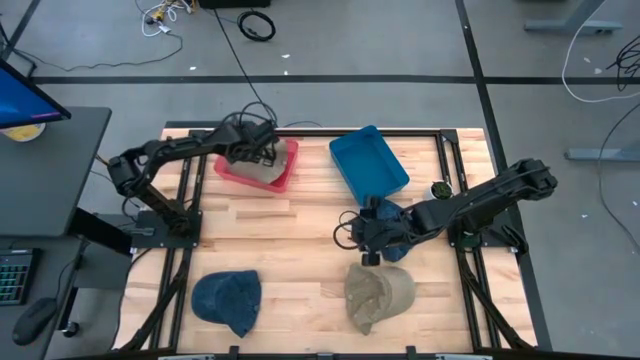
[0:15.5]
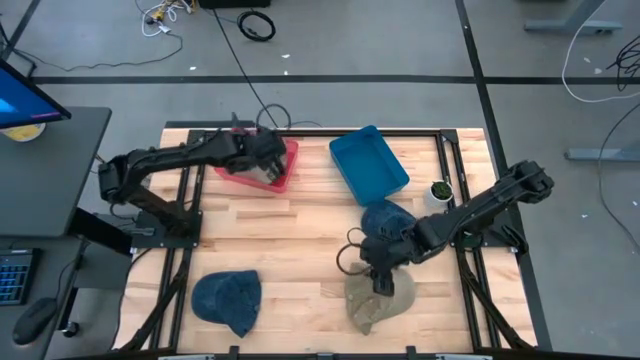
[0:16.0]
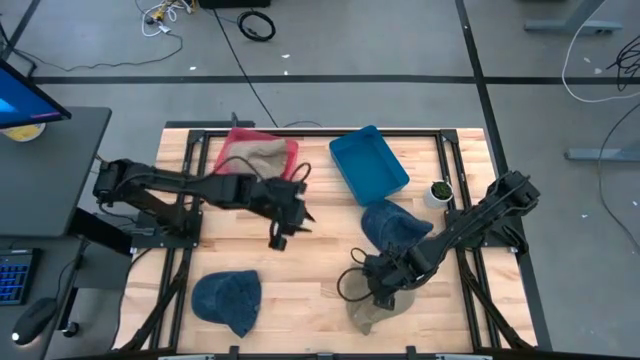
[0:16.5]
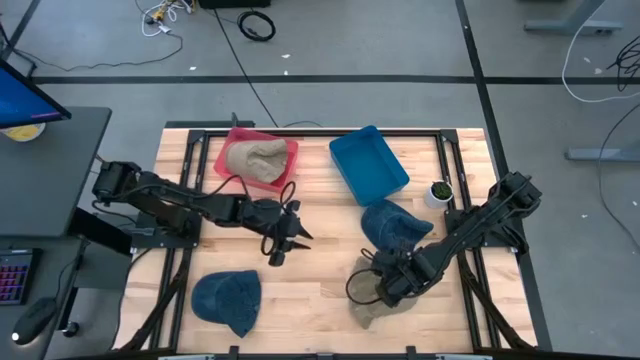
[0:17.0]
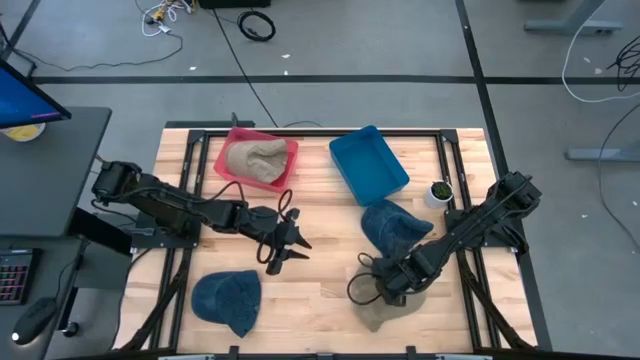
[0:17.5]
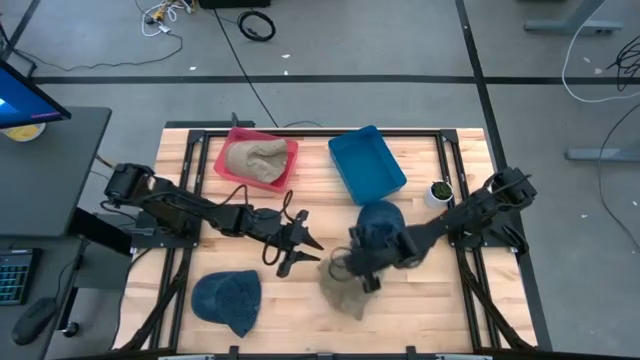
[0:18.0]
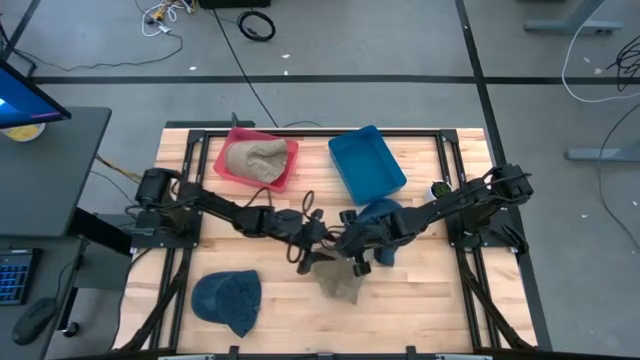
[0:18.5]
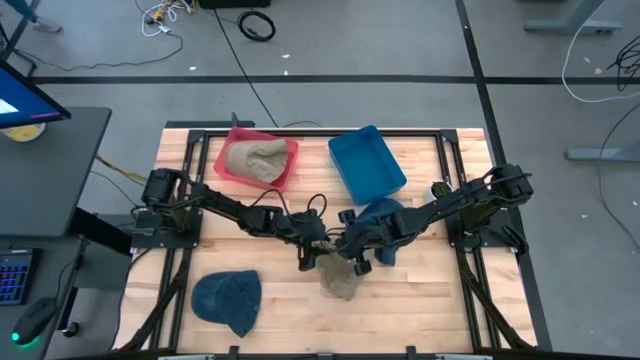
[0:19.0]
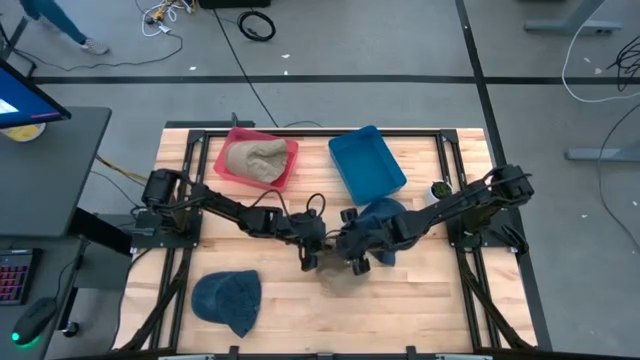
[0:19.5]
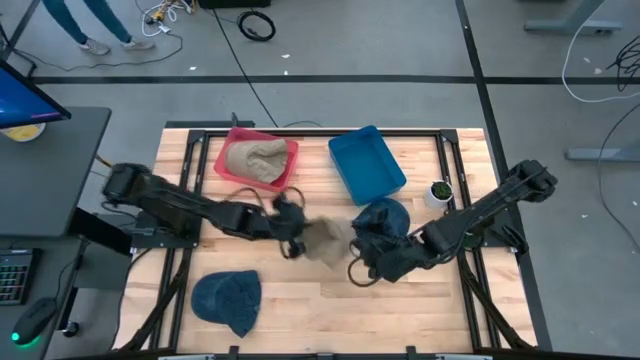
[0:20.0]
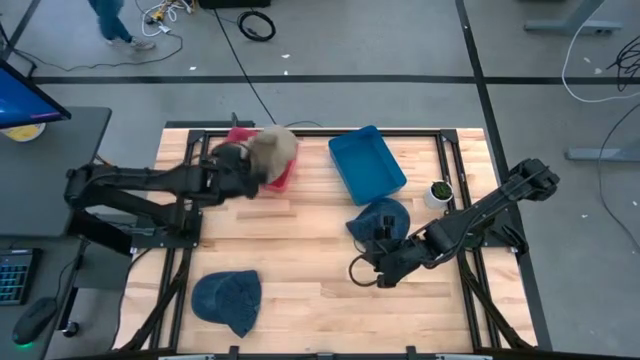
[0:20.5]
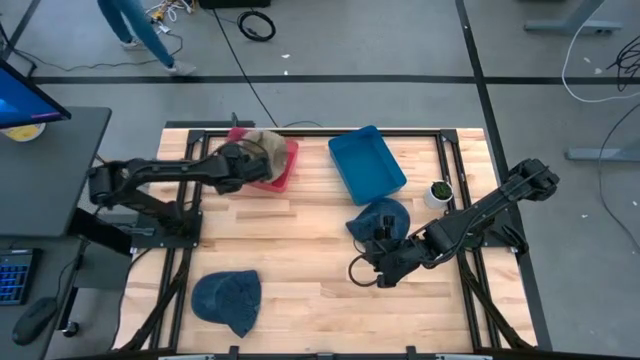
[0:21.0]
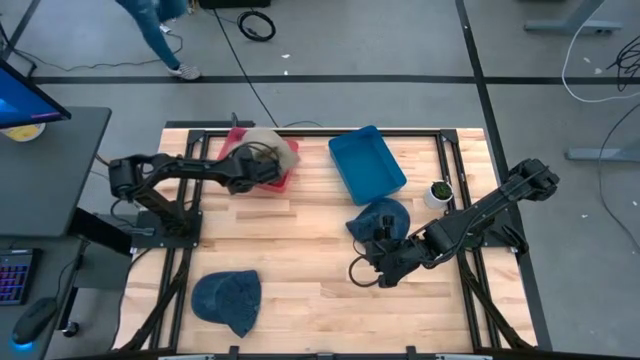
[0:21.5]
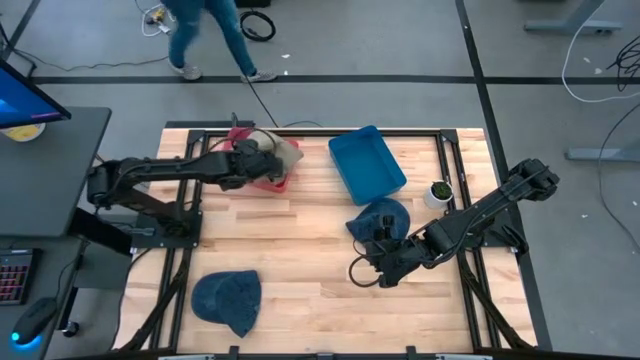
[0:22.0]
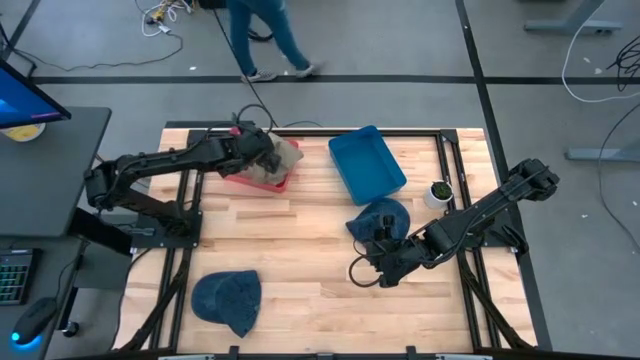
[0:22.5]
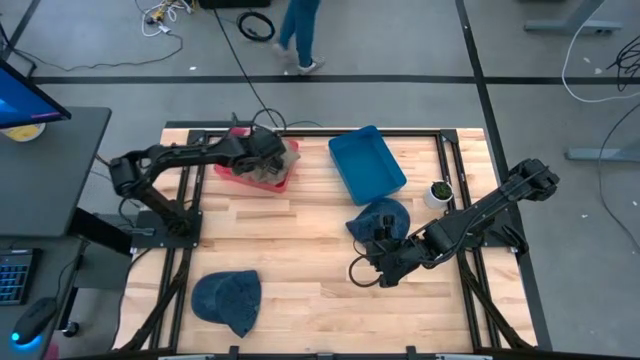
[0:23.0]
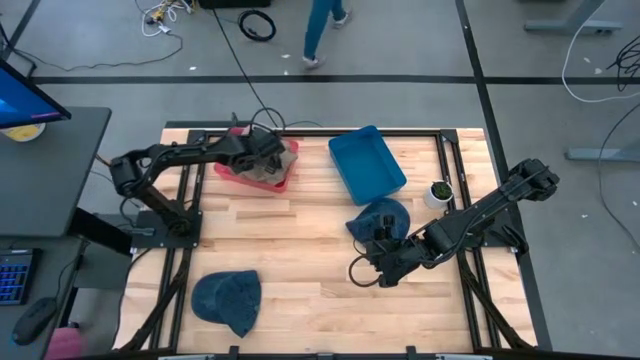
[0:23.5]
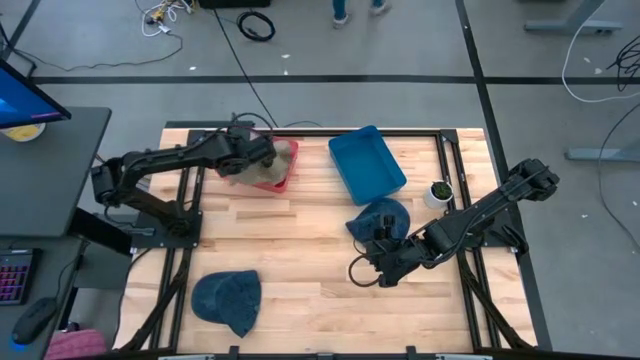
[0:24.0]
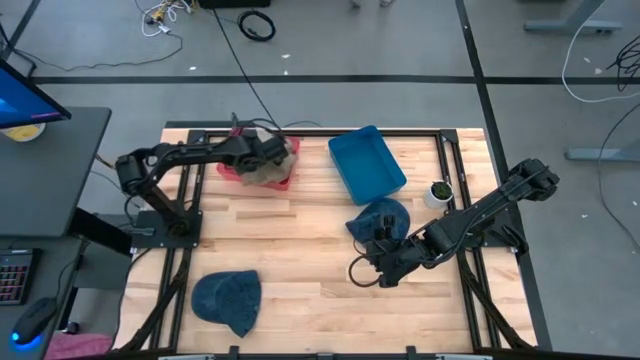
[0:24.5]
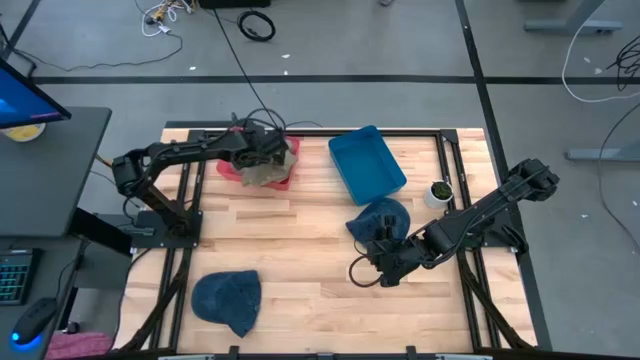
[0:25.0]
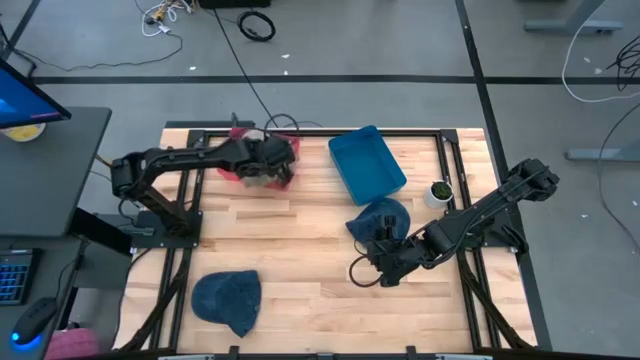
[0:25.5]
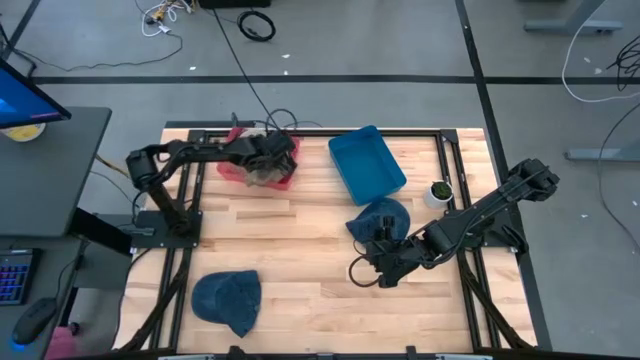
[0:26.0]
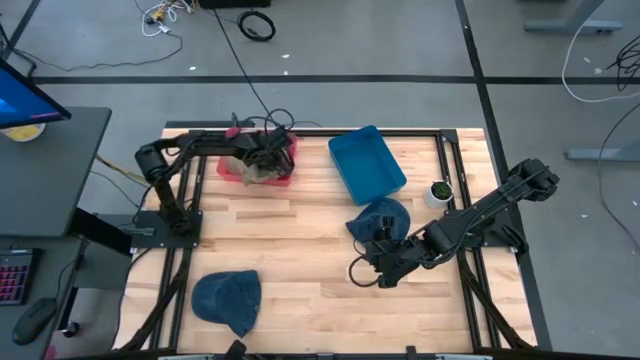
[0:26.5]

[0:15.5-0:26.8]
Task: Pick & Place hat
Put the brown cap into the red bin

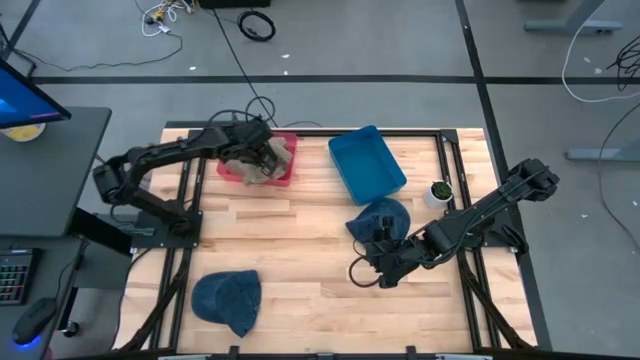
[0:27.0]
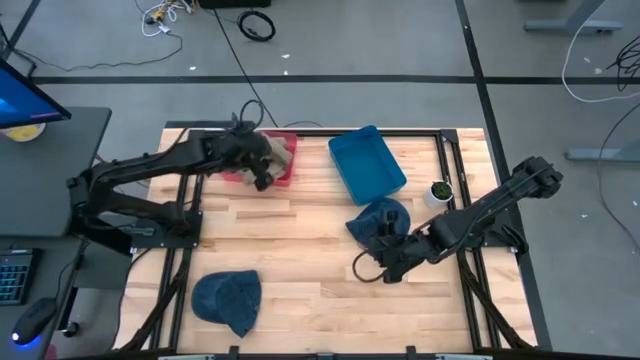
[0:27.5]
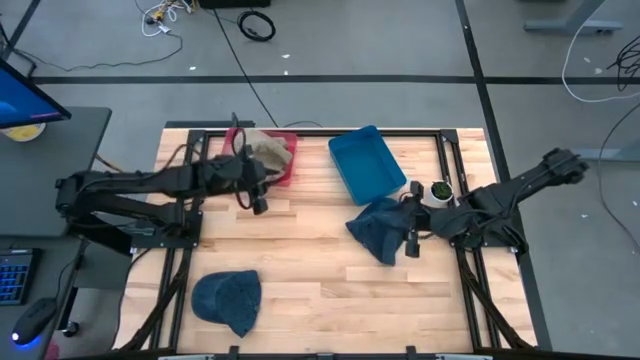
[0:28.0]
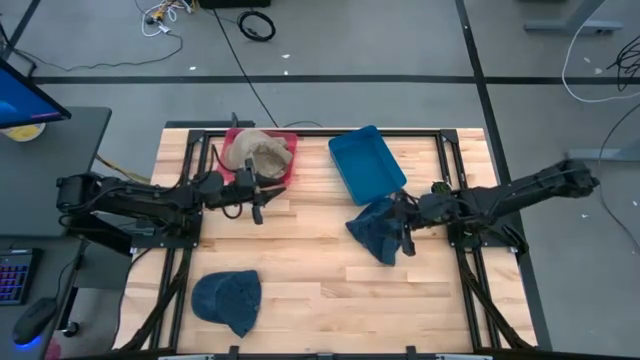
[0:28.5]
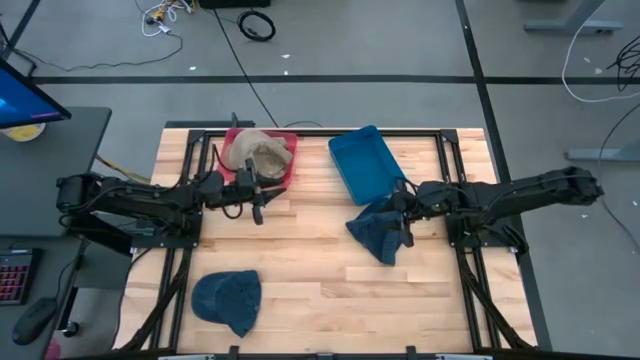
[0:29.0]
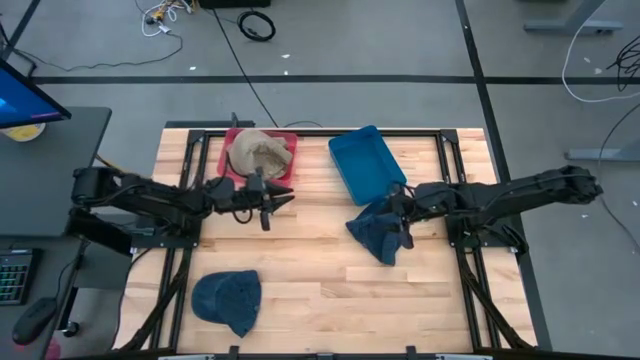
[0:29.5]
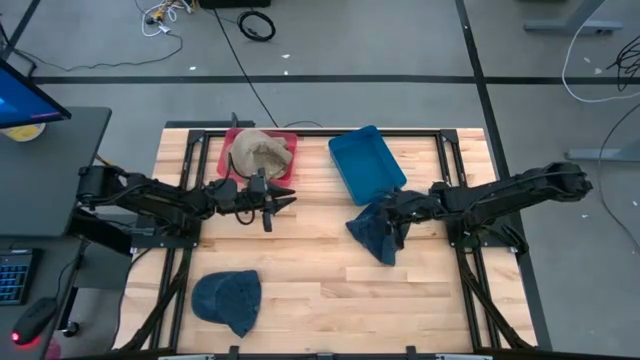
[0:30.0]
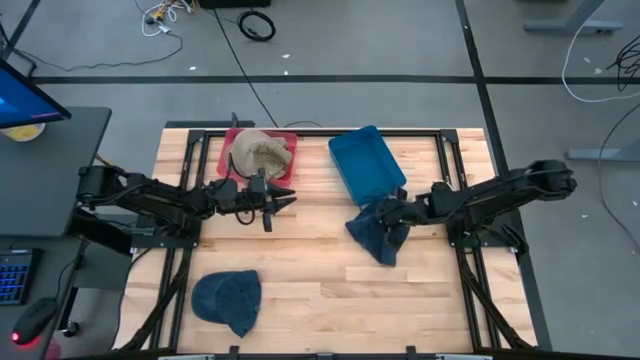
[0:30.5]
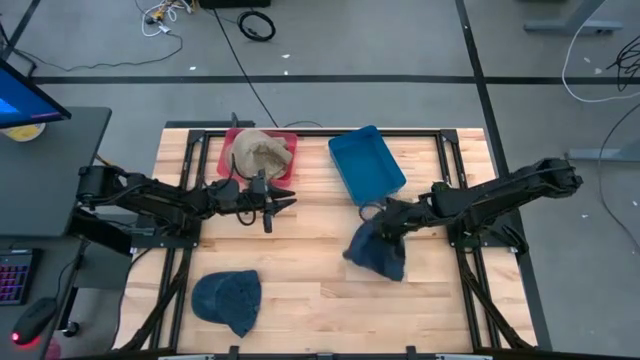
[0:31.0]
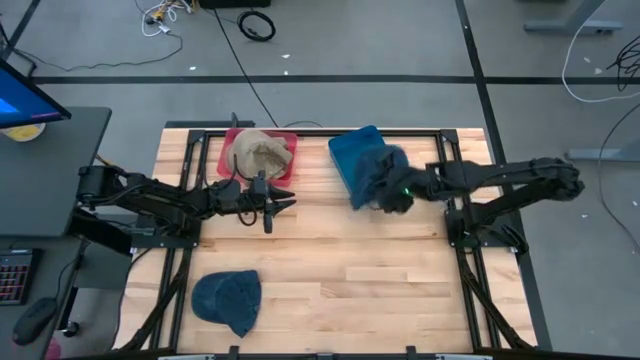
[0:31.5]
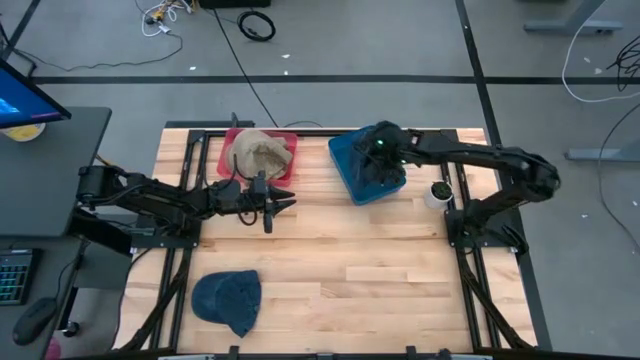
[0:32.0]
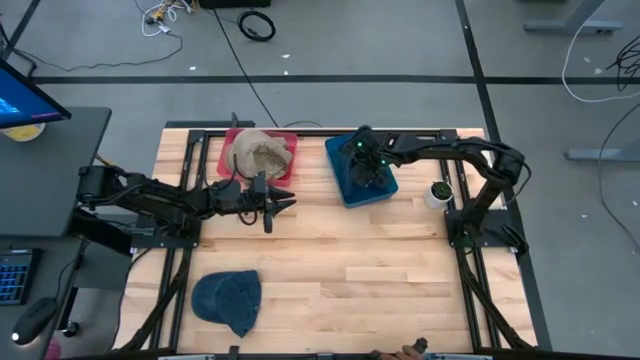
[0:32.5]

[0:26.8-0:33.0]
Put the top blue cap into the blue bin

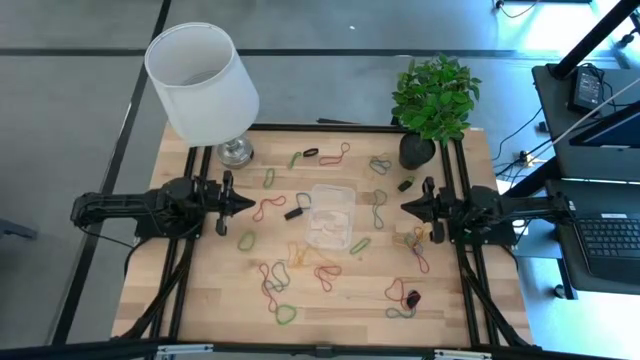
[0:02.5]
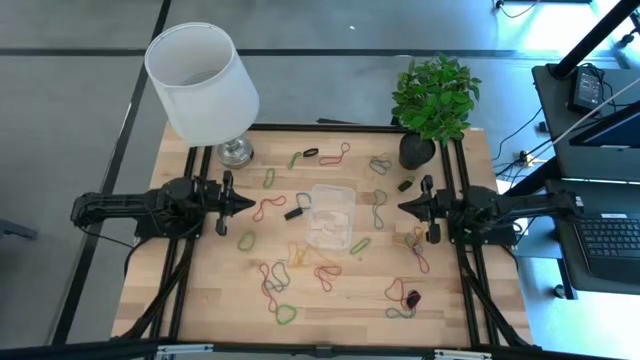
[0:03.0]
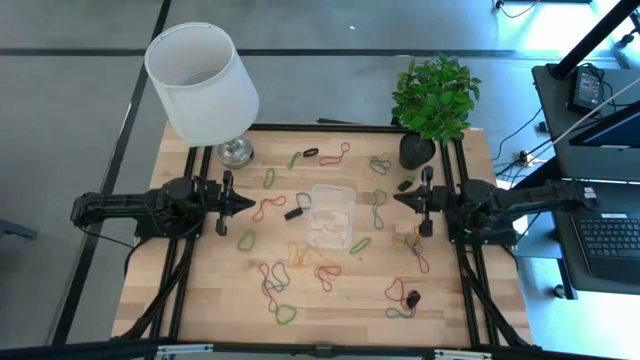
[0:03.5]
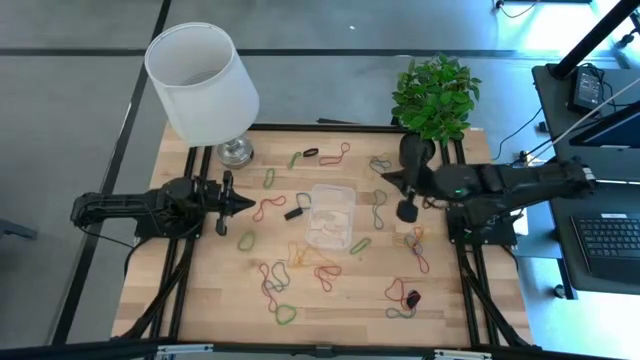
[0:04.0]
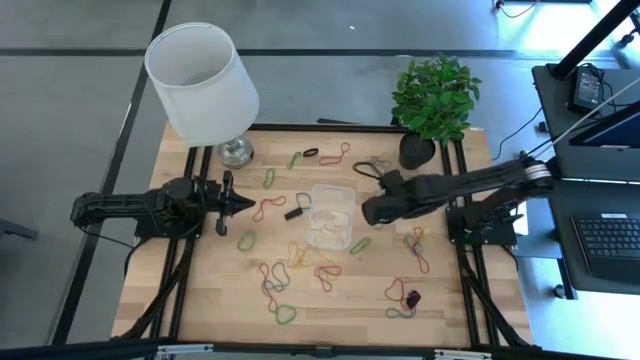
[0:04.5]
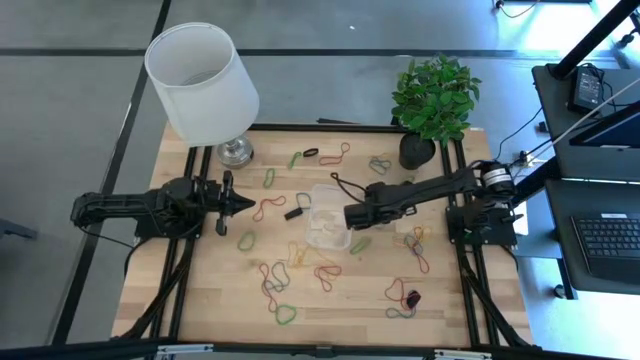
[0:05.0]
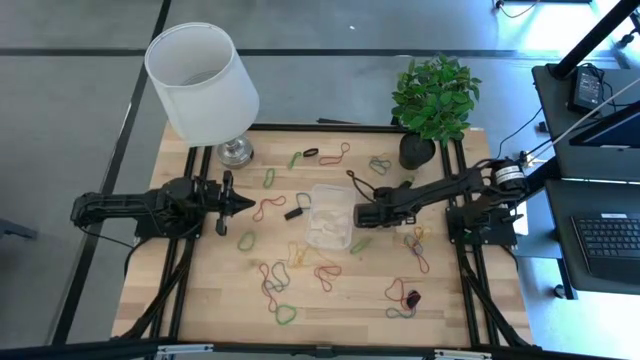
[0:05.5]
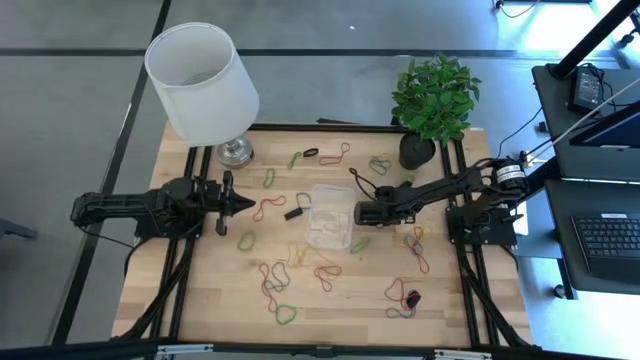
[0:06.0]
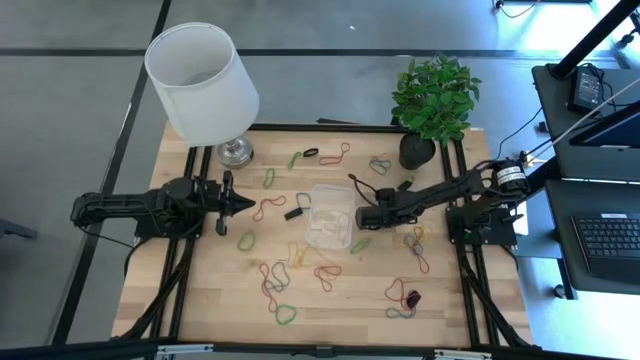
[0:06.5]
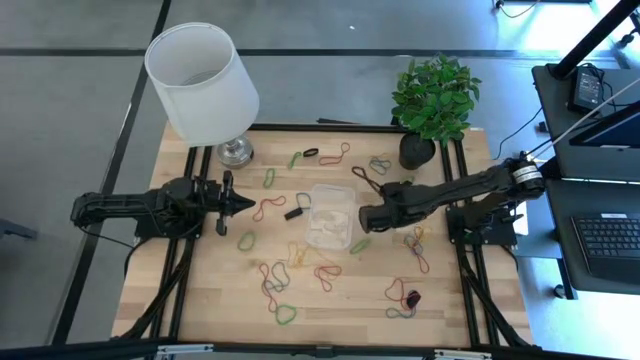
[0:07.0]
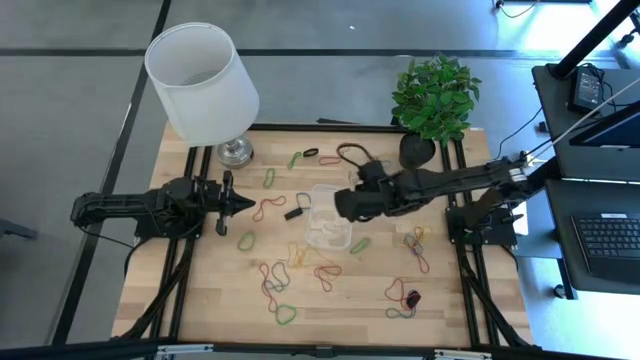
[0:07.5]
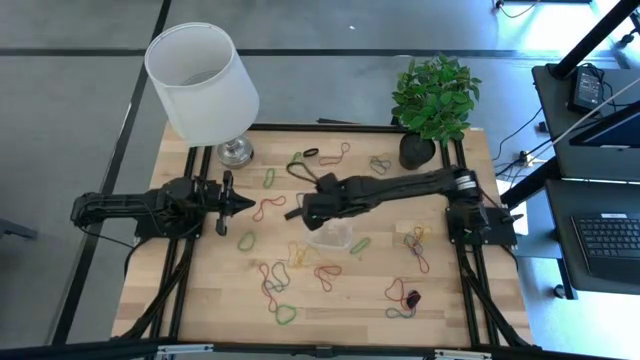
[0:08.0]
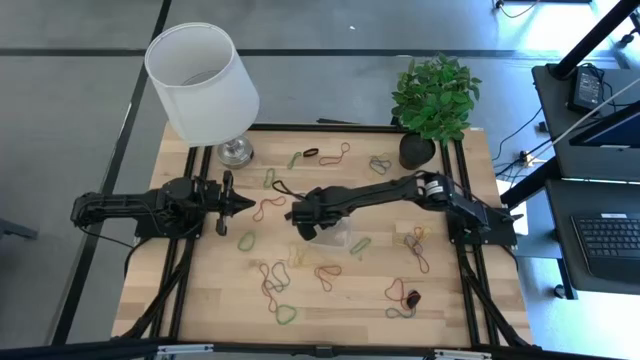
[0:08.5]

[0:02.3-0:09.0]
Task: Pick and place rubber bands into bin
Put the blue rubber band into the bin
